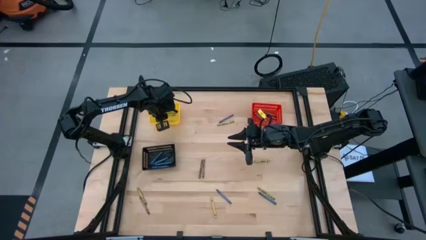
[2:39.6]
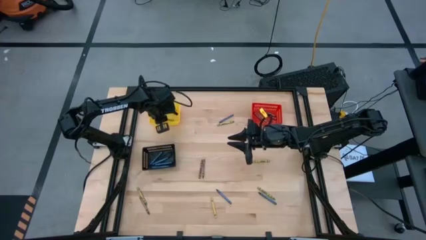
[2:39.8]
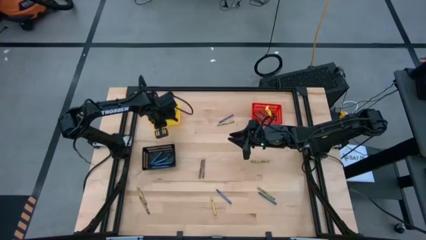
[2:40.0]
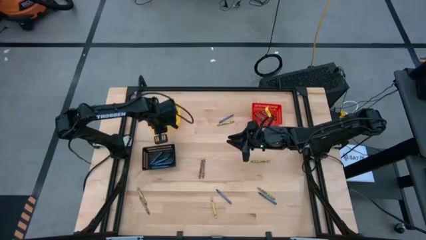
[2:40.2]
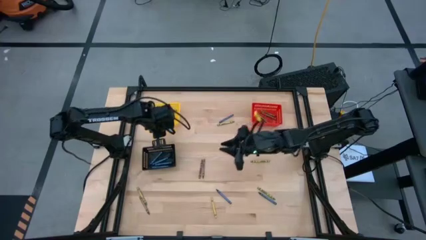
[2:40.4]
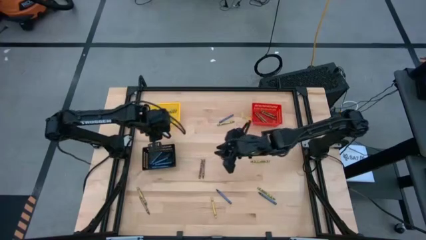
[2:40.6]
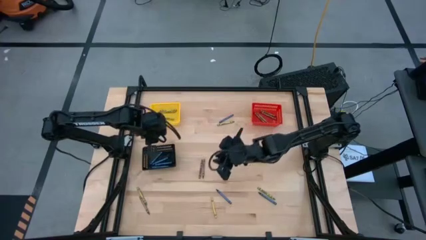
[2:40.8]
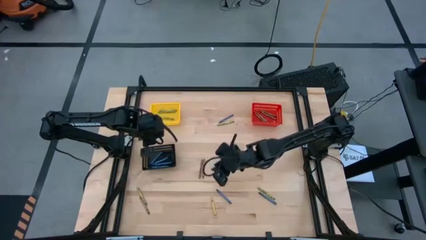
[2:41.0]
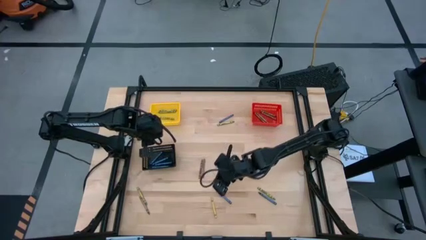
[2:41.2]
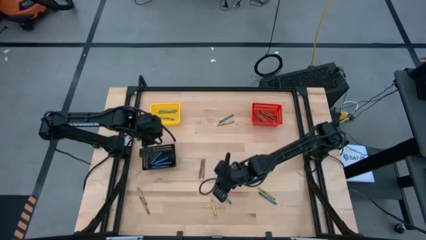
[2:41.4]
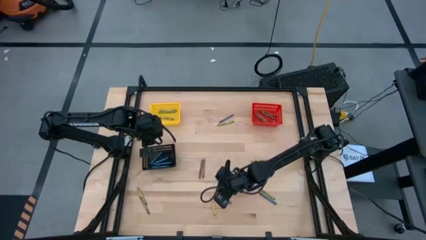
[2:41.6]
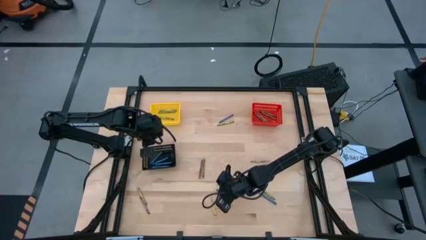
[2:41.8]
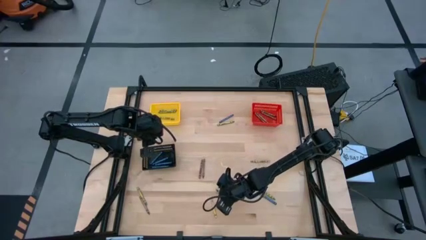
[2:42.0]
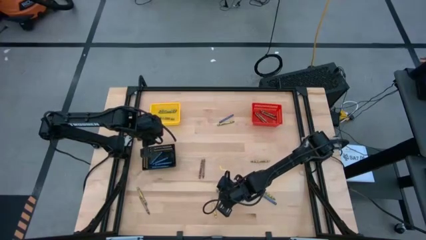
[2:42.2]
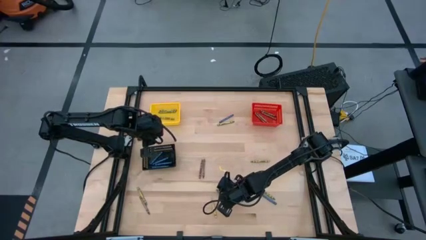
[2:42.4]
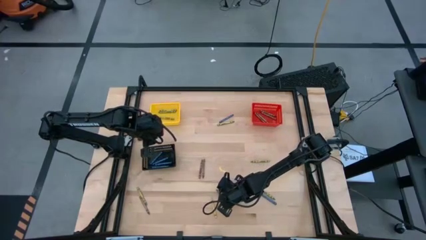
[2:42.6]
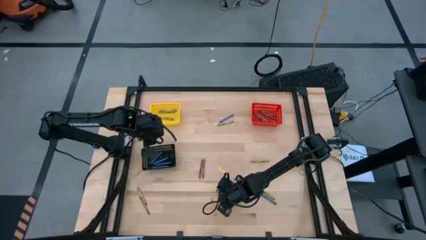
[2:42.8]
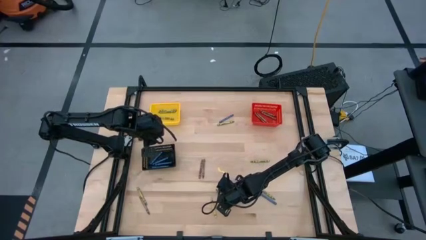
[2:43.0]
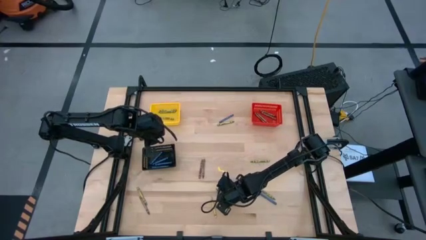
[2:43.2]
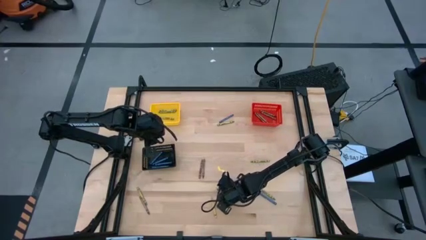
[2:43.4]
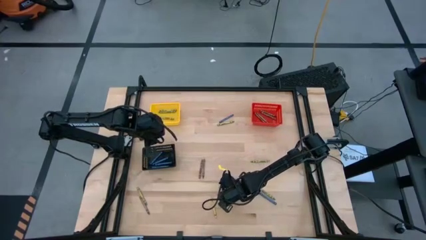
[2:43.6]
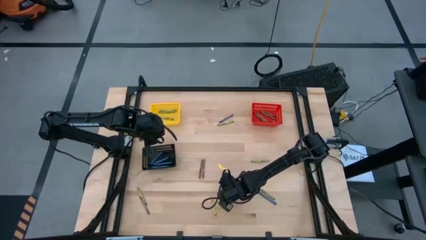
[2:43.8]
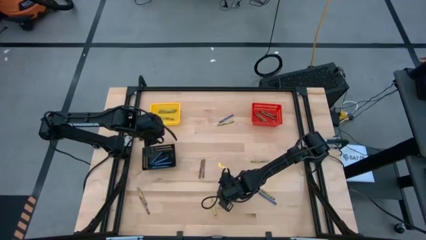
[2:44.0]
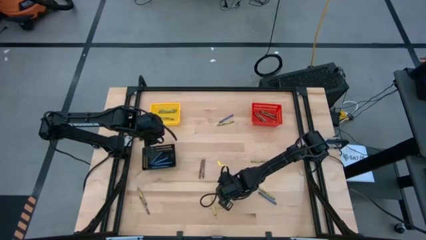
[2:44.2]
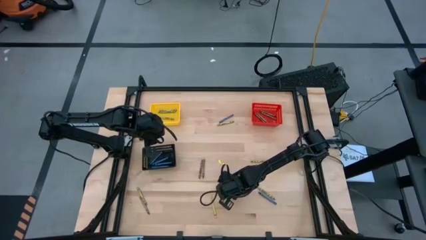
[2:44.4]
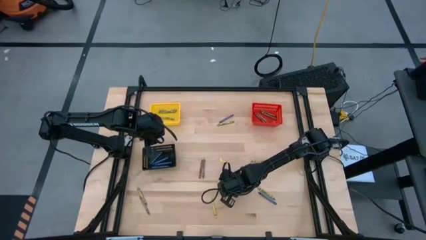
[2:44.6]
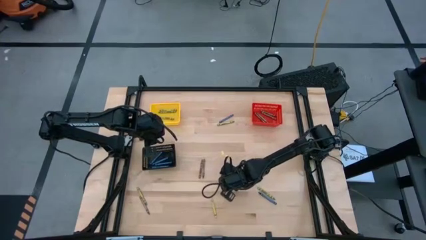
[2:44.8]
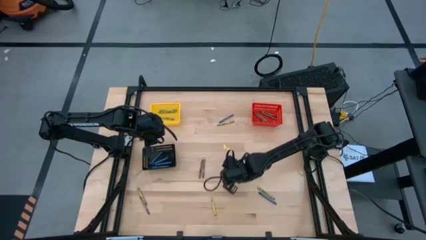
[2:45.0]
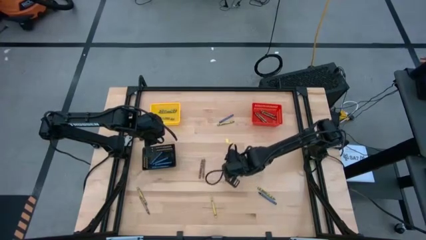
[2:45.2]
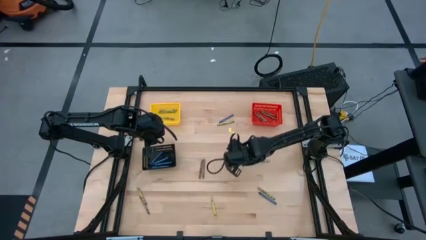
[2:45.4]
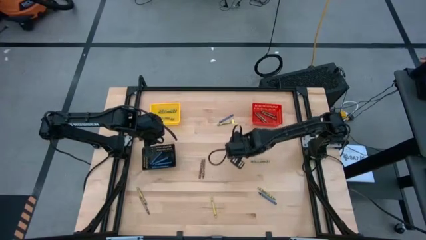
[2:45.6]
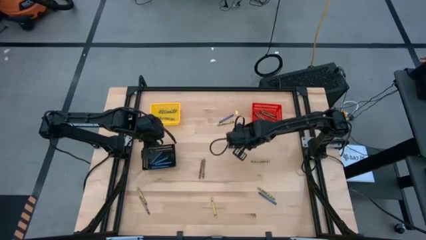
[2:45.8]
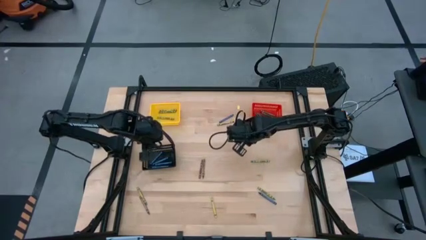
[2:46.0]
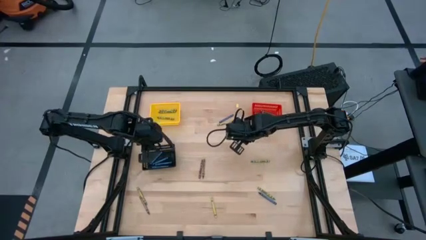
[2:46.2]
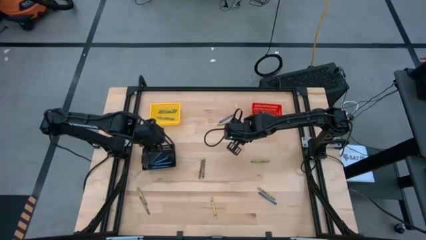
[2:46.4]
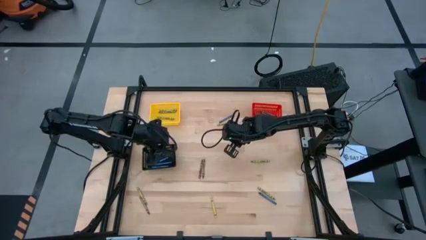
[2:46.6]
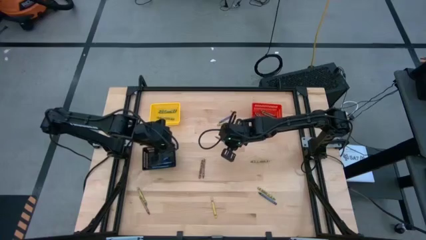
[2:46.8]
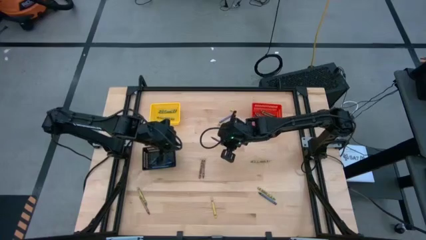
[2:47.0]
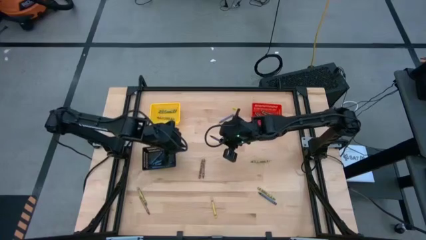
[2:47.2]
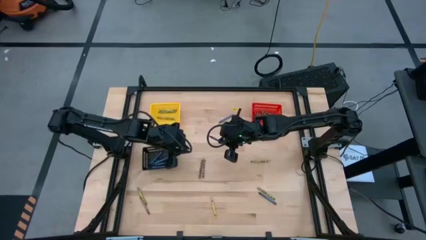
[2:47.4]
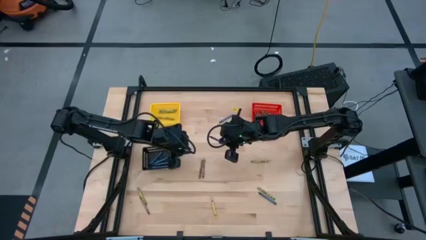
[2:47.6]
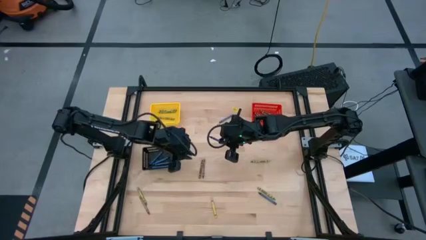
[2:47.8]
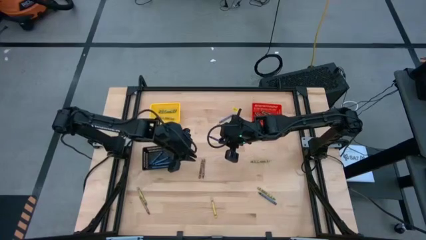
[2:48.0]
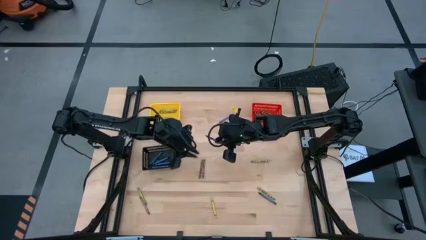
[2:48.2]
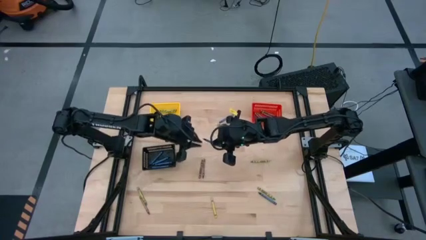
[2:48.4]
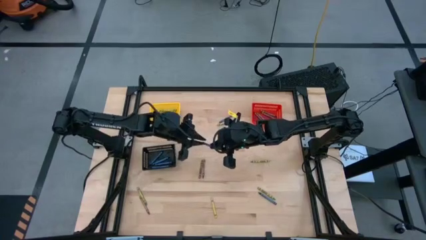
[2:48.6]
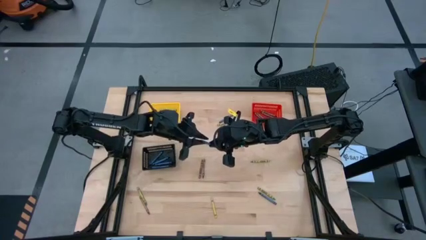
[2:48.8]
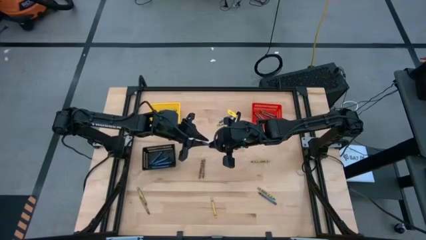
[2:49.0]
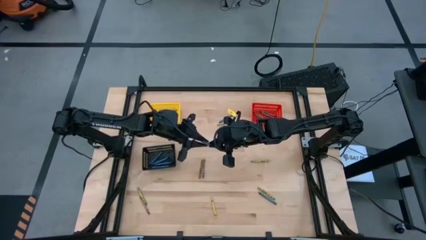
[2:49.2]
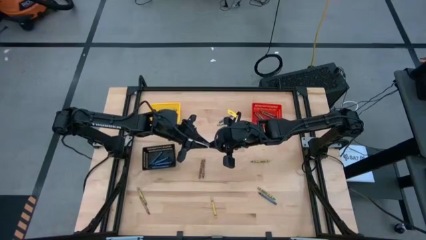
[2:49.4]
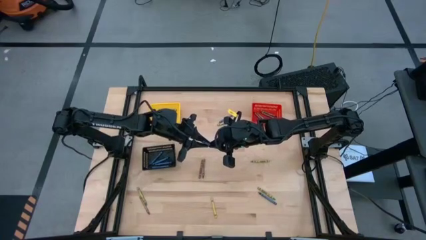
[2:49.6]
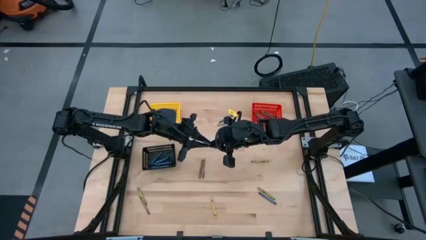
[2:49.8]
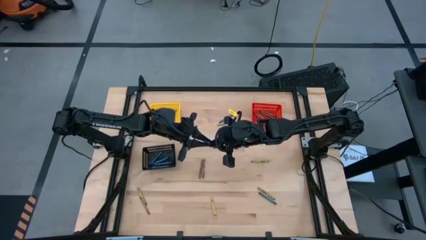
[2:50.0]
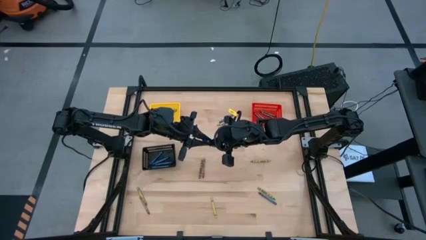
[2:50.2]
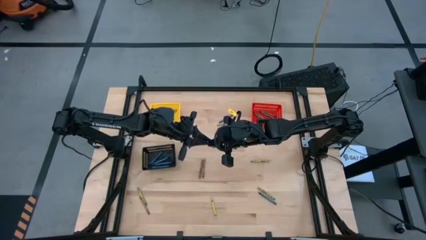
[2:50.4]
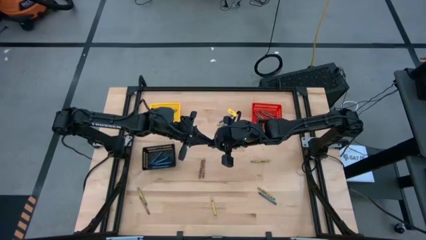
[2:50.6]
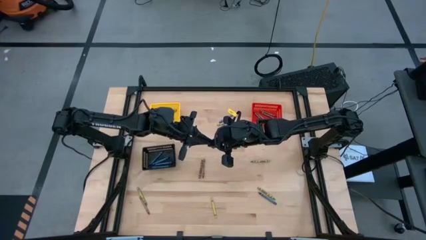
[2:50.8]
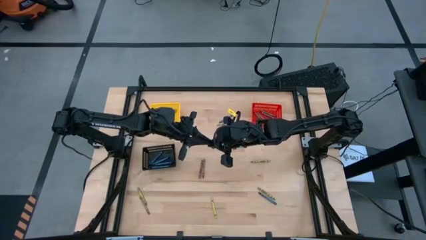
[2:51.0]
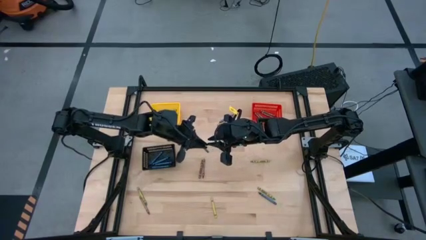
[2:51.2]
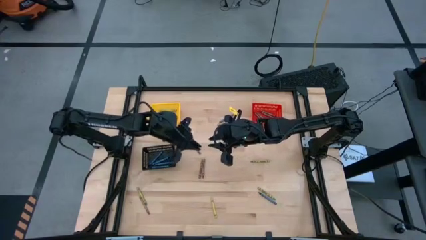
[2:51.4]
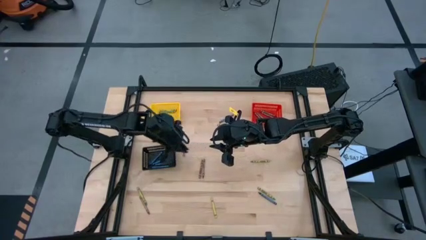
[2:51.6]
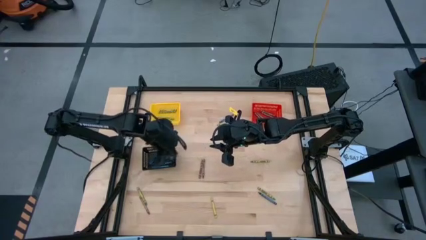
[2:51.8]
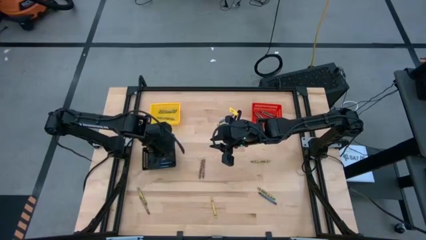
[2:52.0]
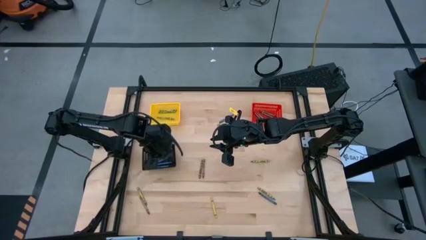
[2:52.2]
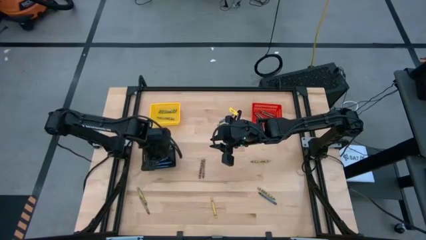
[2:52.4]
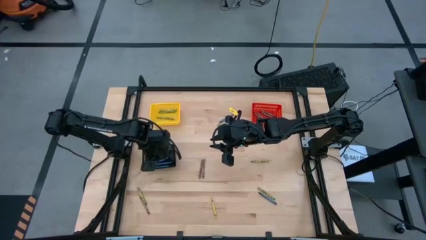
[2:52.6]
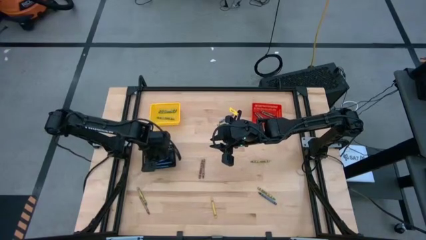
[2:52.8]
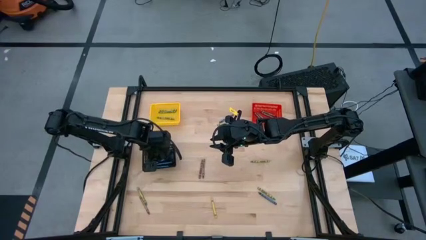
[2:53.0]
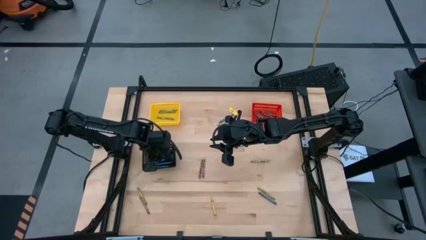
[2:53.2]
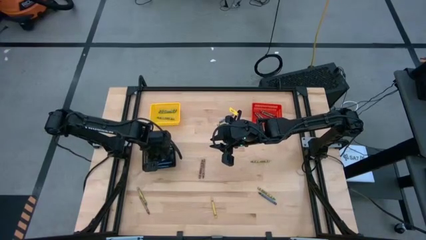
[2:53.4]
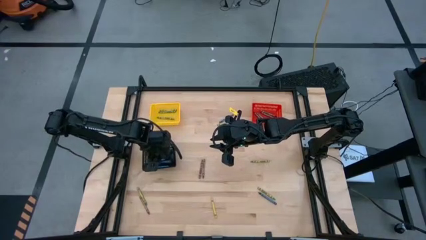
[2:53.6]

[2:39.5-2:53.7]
Task: Sort crayons
Put the blue crayon into the black bin

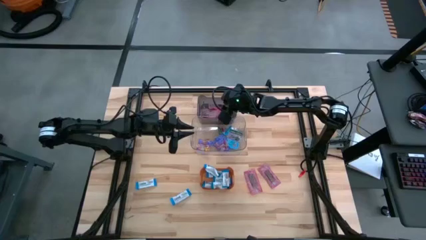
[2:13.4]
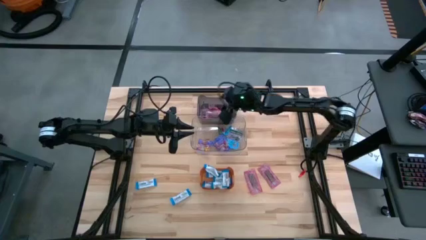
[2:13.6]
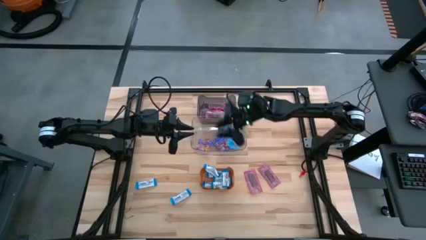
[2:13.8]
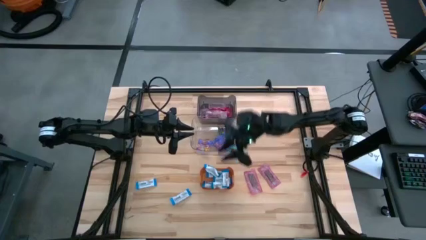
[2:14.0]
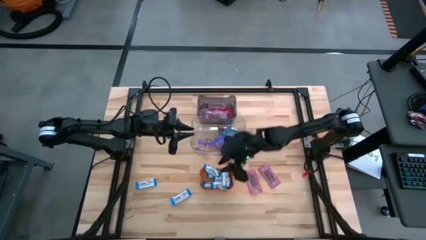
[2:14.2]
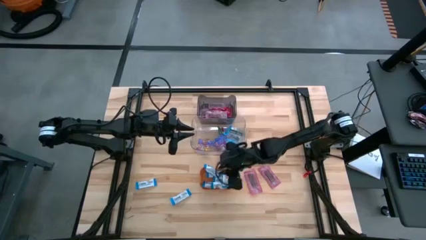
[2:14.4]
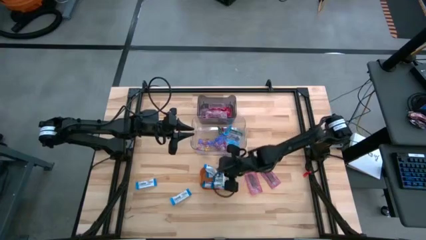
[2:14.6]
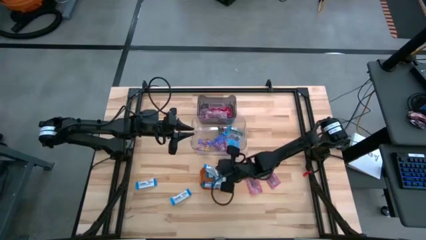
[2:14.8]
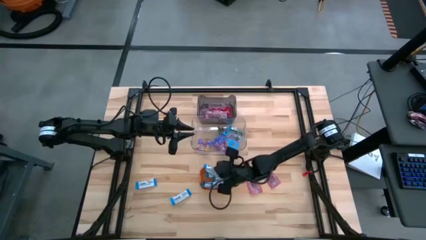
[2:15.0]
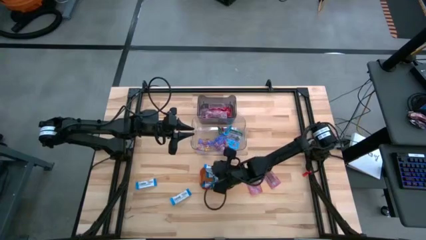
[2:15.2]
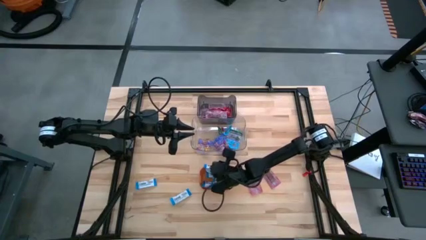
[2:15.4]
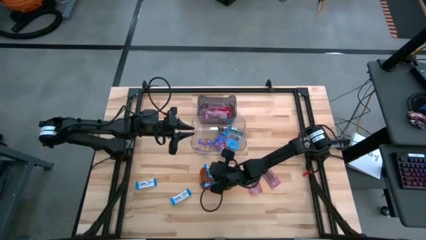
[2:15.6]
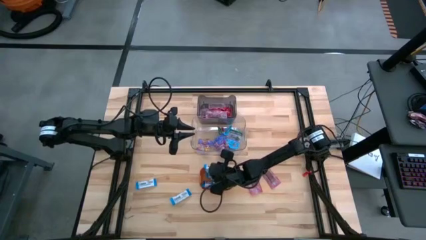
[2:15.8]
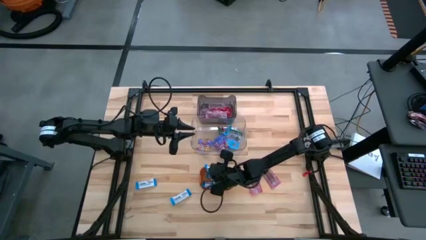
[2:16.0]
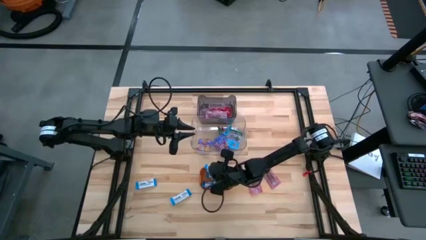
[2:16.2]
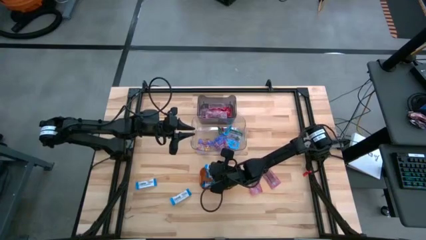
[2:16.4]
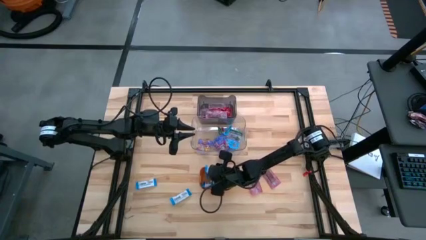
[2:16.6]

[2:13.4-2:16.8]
Task: Sort candy
Adjust the white chocolate bar in the orange bin
